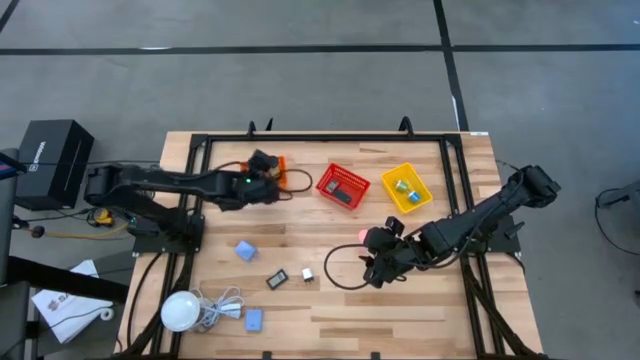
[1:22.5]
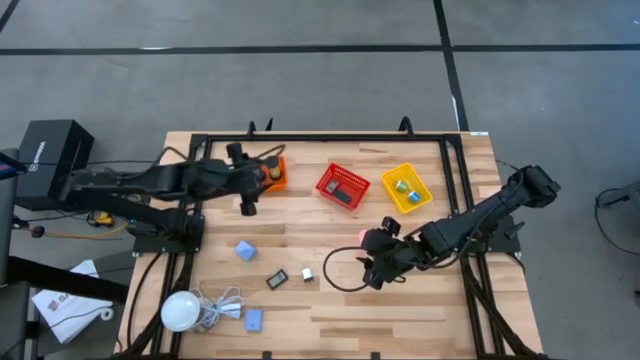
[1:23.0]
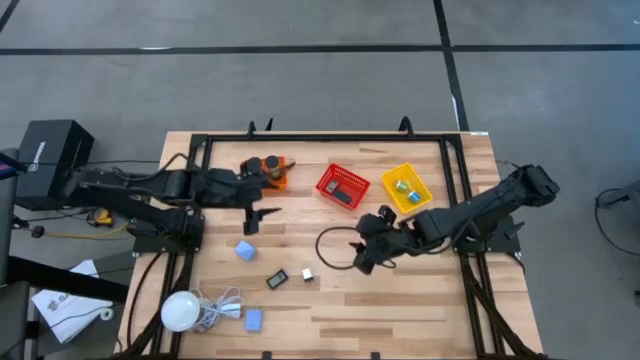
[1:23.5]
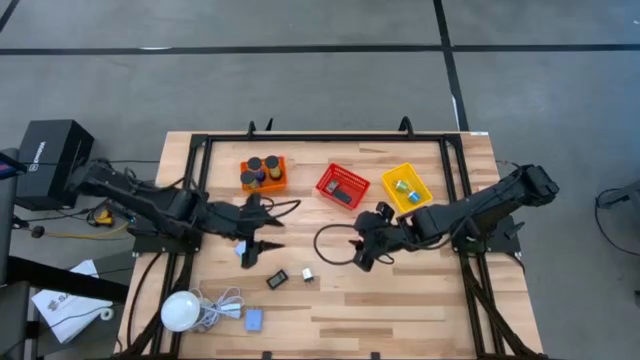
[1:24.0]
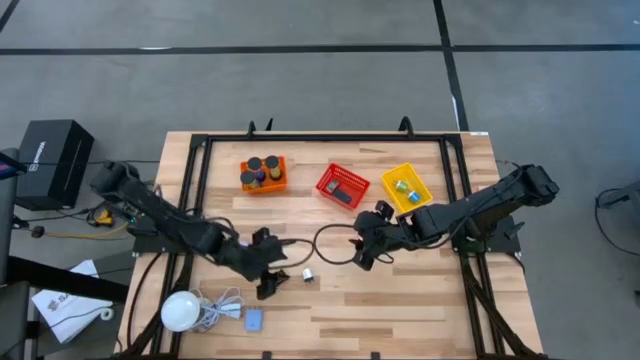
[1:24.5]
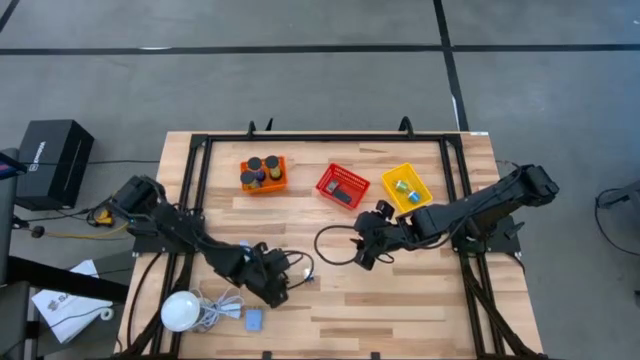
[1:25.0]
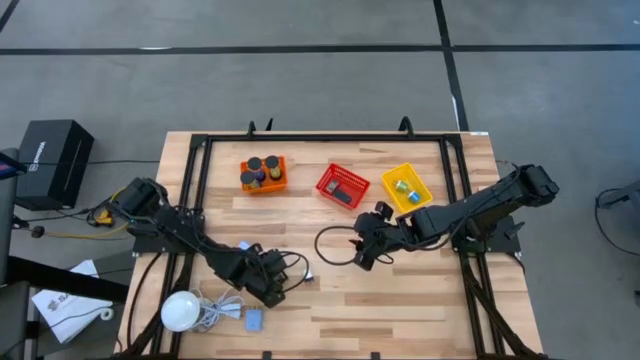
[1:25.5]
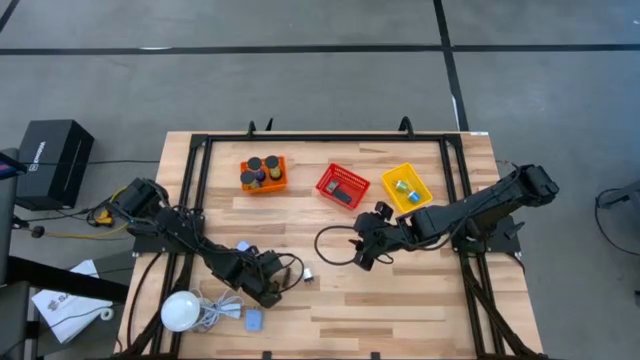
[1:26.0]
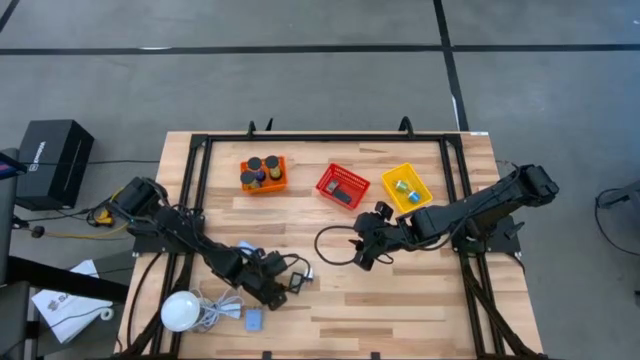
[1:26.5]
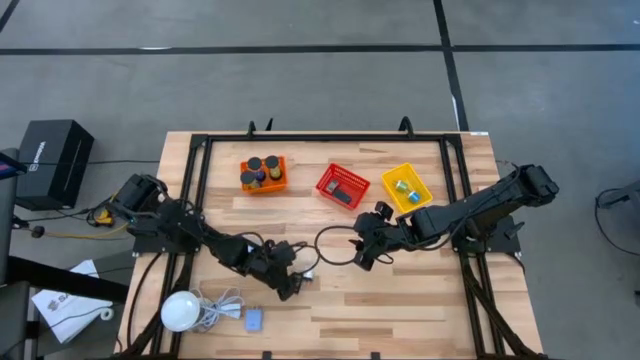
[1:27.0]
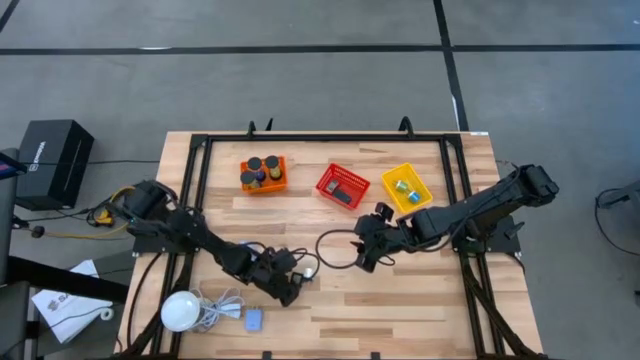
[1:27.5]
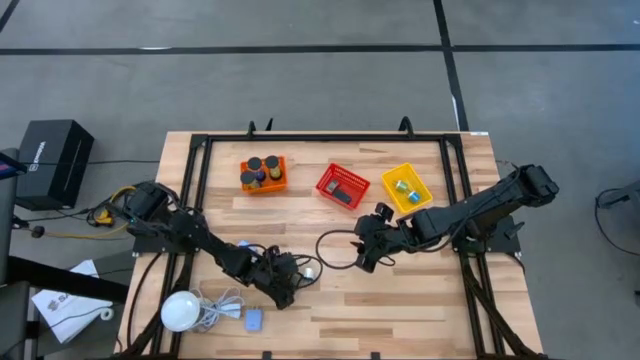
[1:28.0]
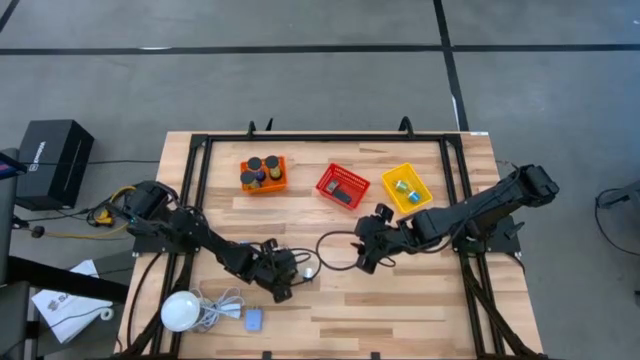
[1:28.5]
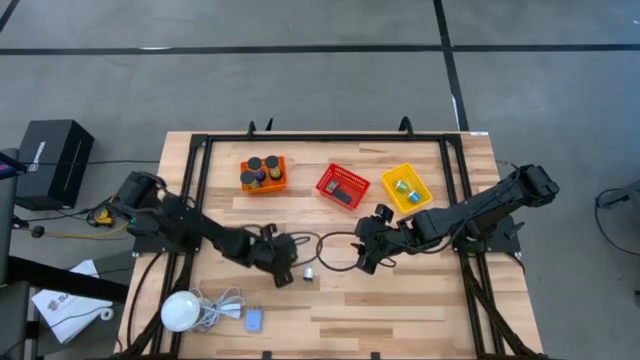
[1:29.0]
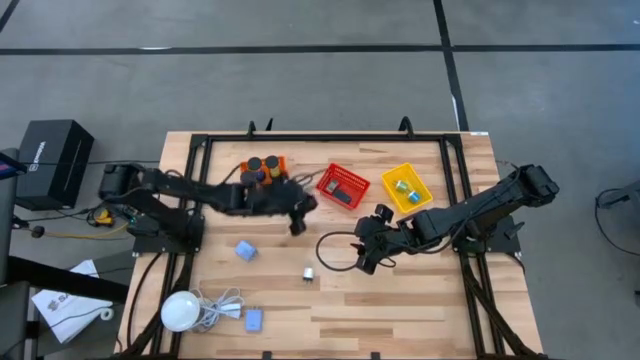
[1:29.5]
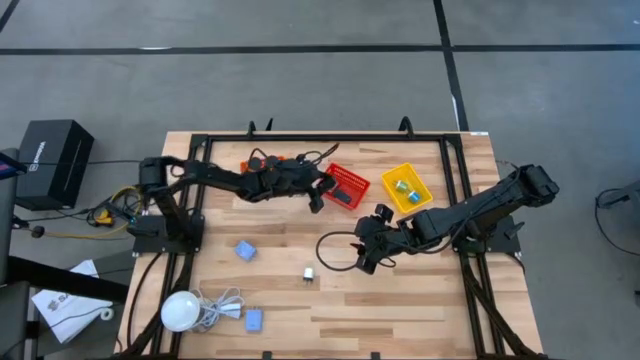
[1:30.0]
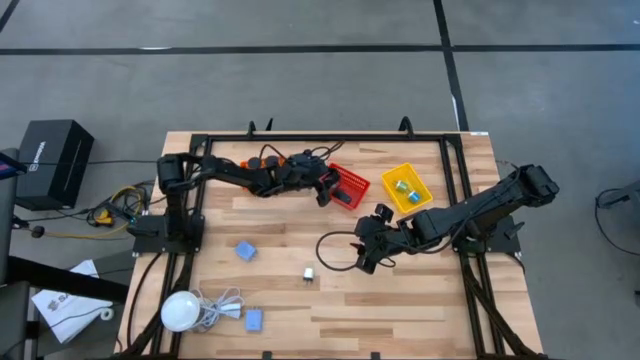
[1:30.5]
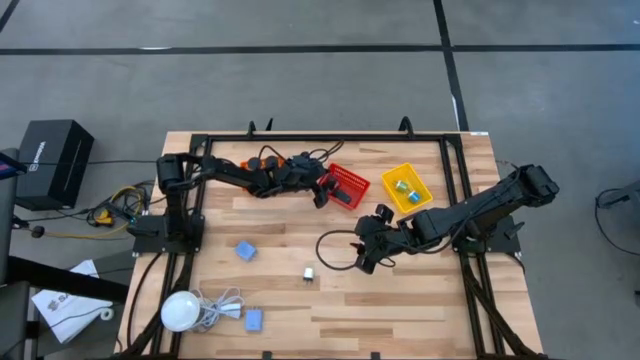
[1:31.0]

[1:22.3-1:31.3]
Task: Pick & Place Office items
Put the black digital clock into the red bin

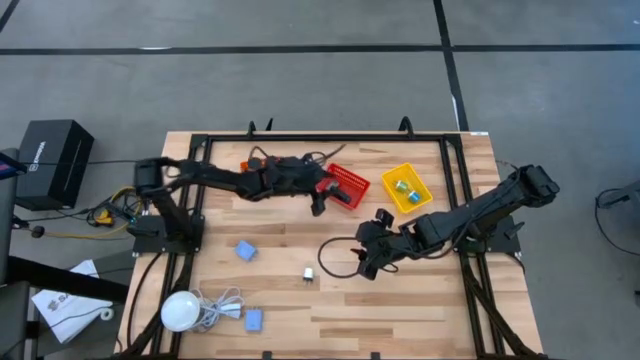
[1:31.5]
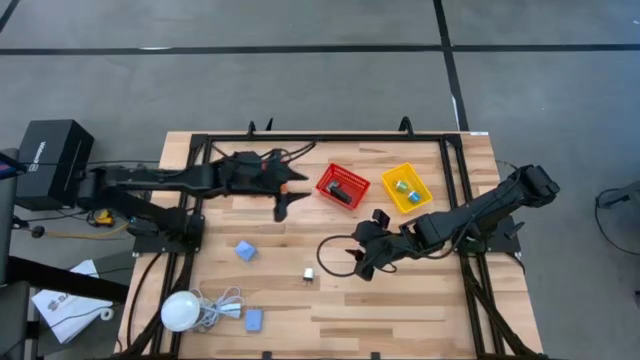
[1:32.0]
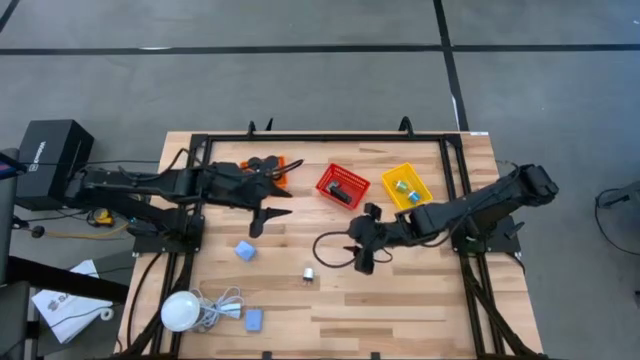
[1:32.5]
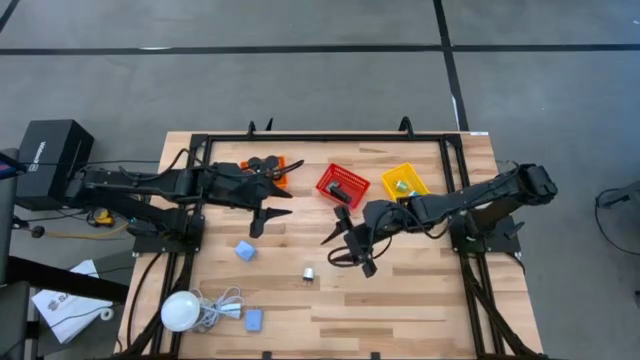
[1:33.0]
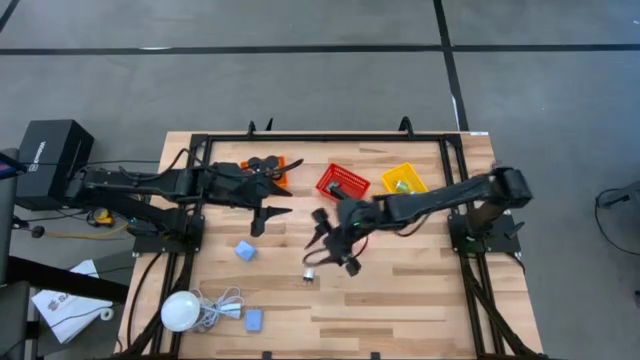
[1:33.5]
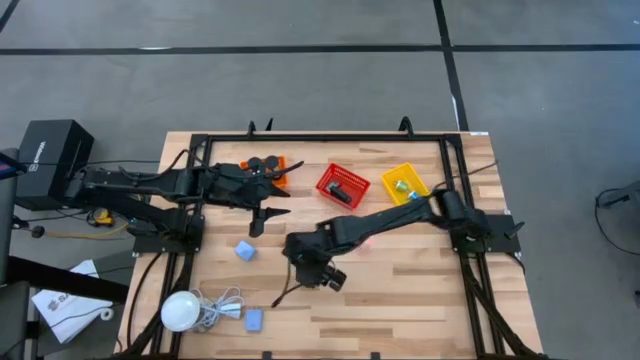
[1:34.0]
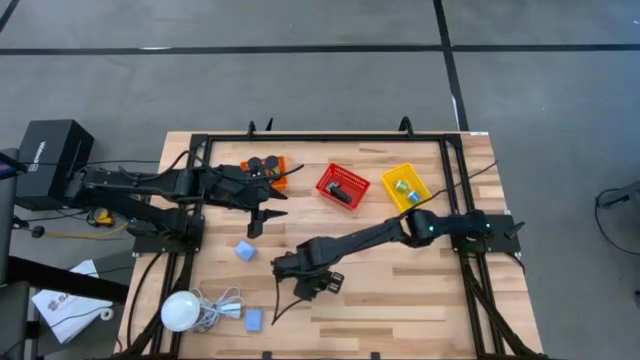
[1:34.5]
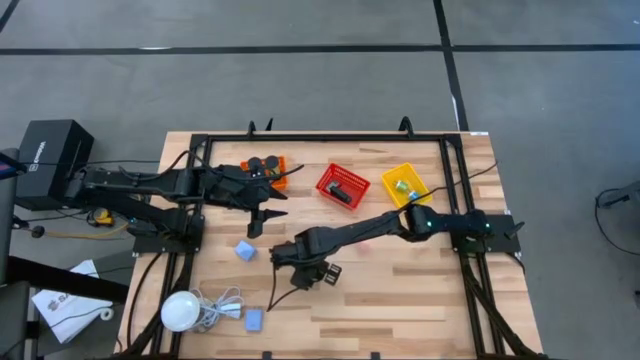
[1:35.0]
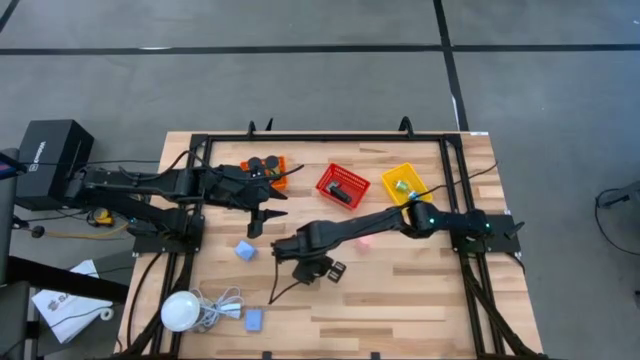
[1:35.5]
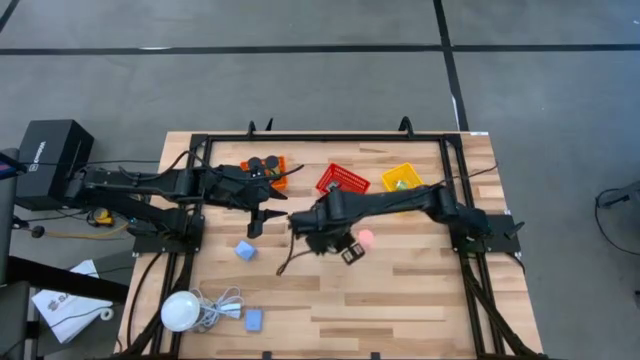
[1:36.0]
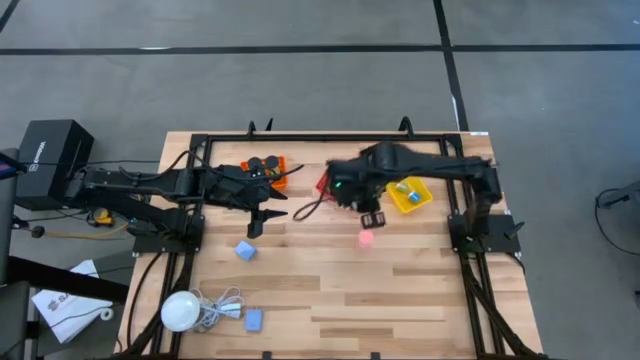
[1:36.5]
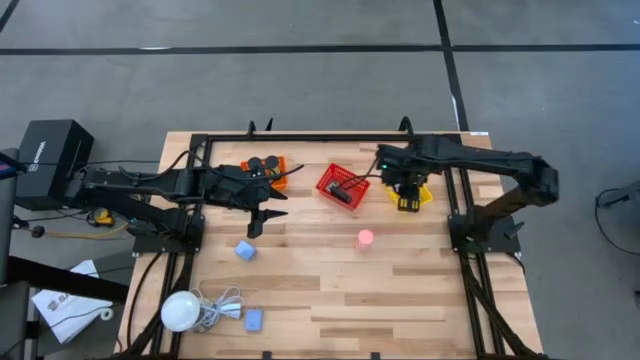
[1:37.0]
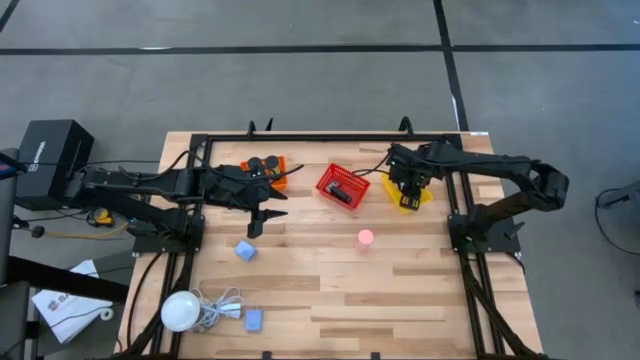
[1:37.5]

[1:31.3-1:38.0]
Put the white charger adapter into the yellow bin
